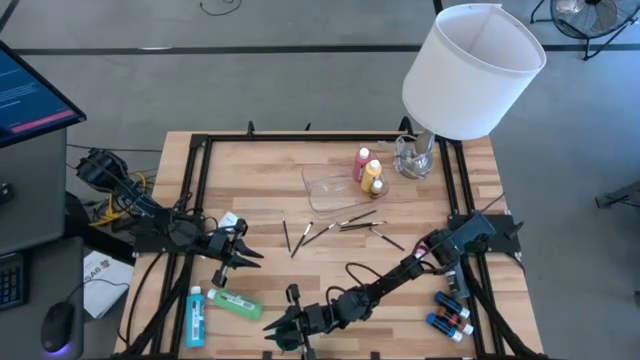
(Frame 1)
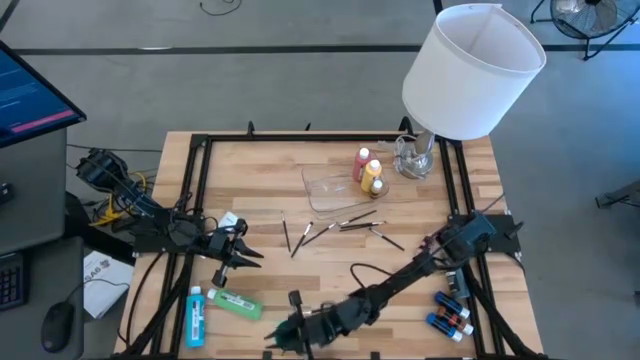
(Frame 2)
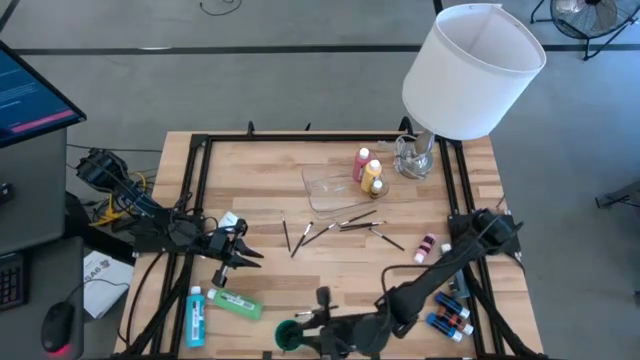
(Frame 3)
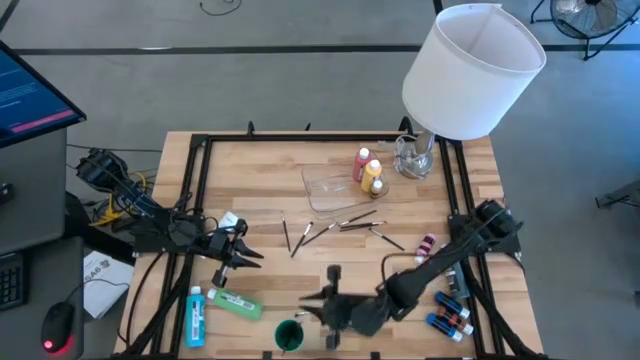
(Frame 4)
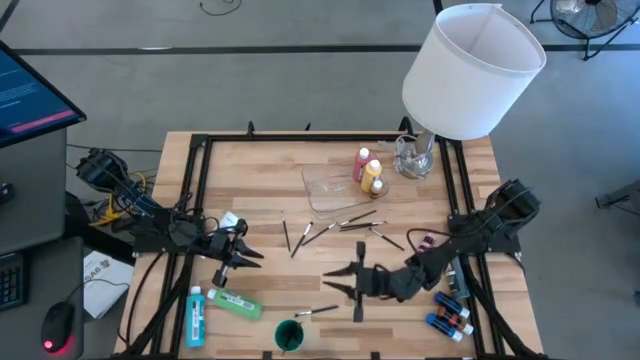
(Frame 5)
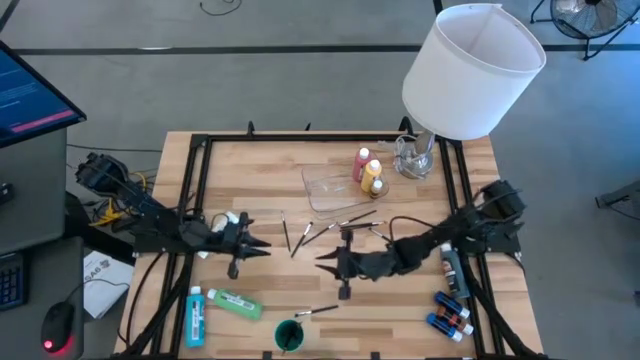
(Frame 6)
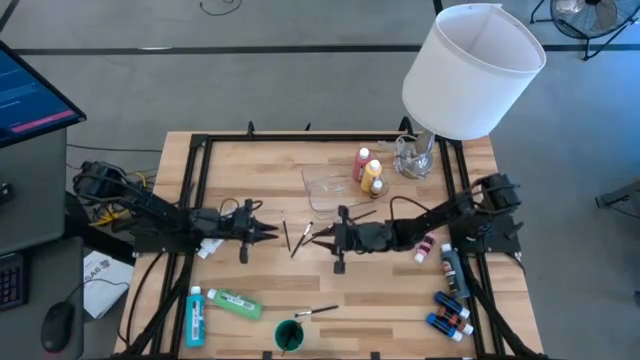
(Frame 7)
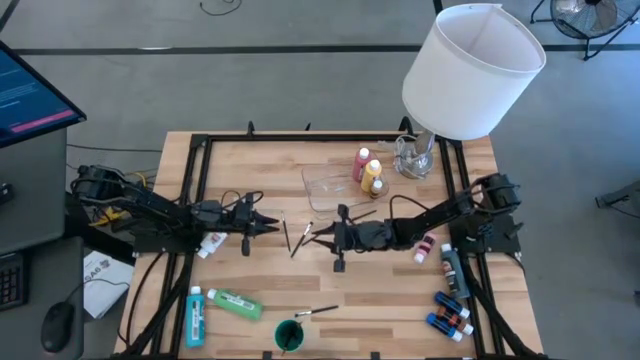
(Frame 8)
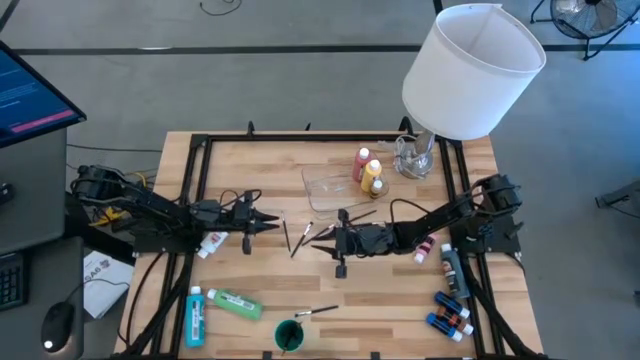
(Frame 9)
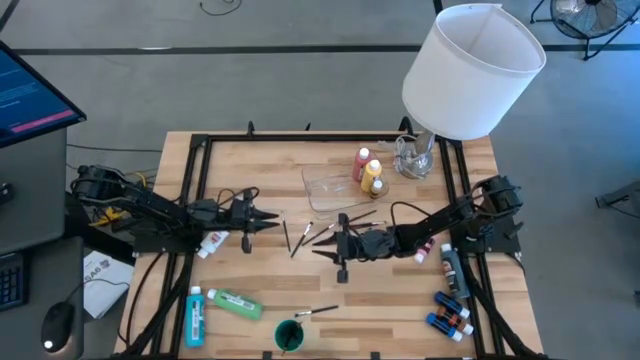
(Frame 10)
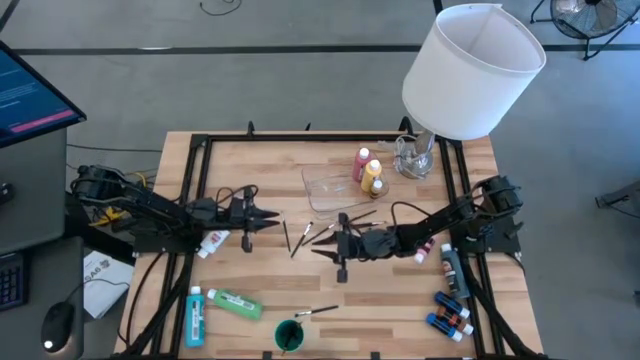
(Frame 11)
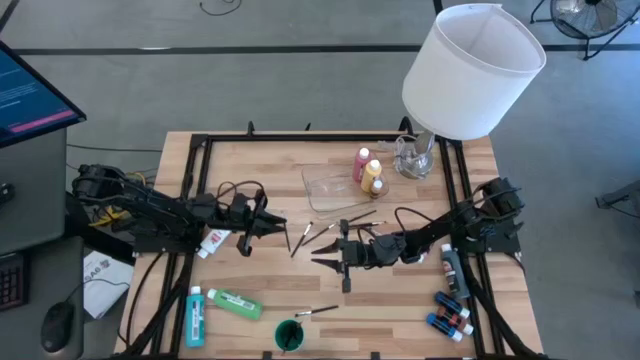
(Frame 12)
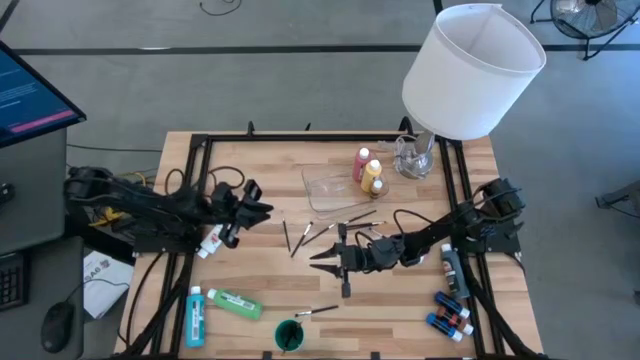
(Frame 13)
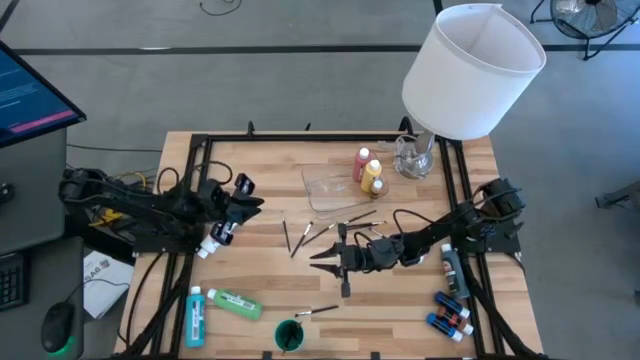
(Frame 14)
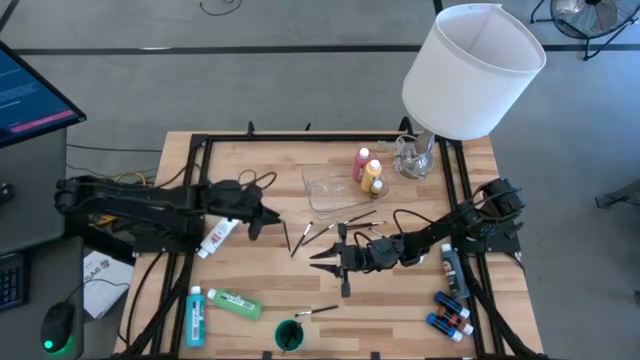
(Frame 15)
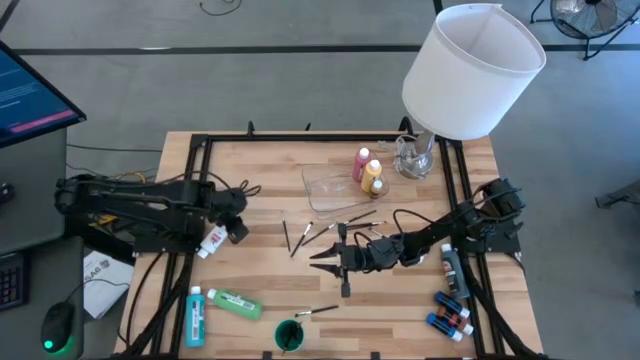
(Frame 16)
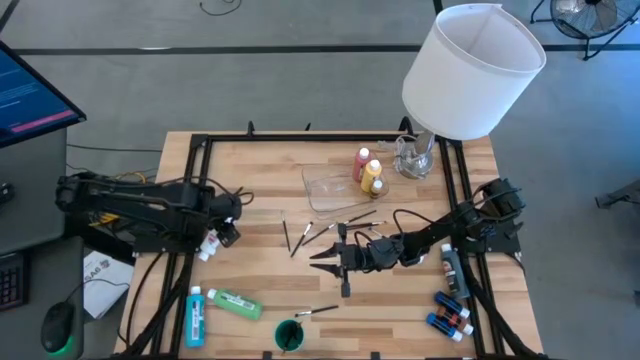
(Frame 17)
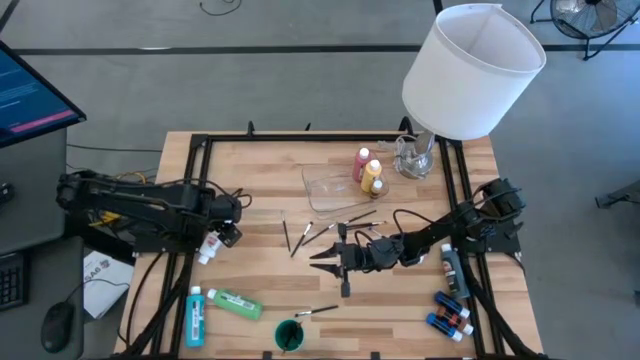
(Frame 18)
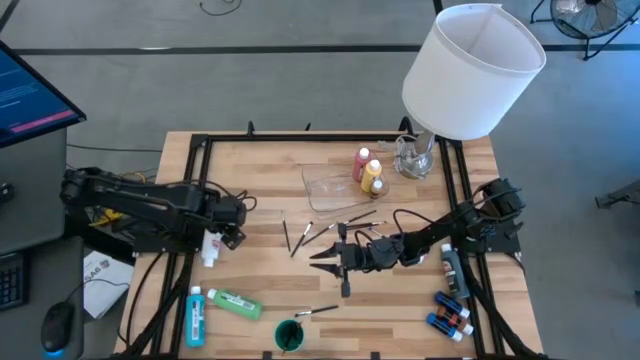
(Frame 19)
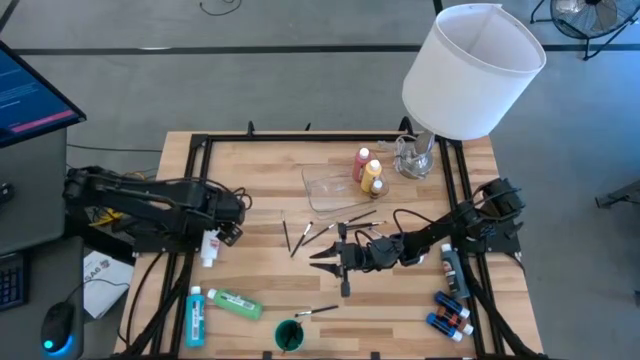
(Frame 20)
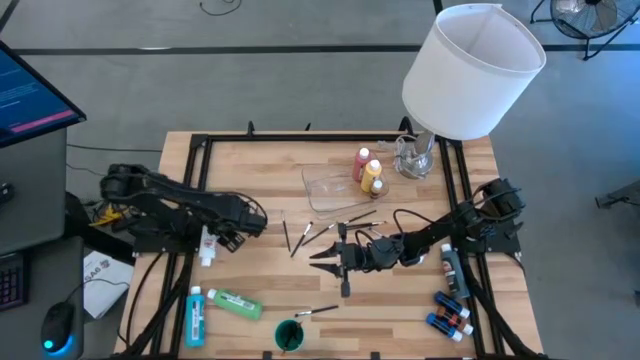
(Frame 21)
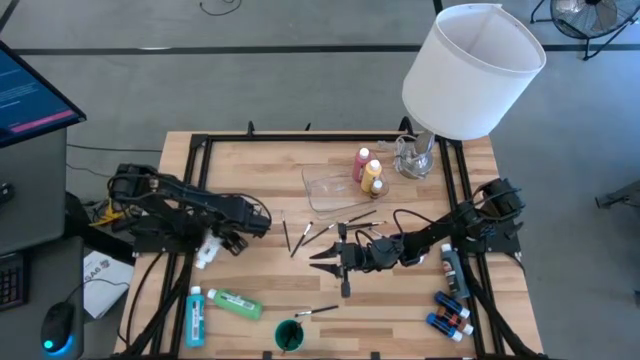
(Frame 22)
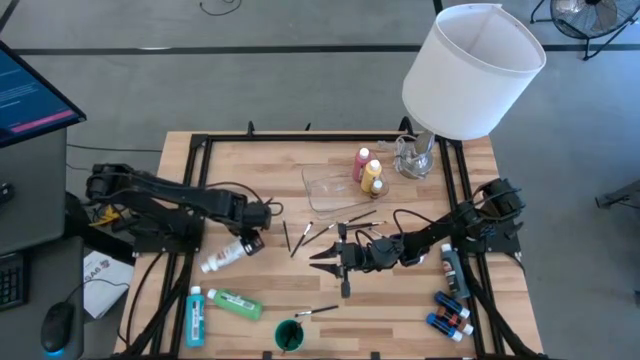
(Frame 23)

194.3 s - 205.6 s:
Task: Pick & Place Paint Supplies
Put the big white paint bottle into the transparent bin
